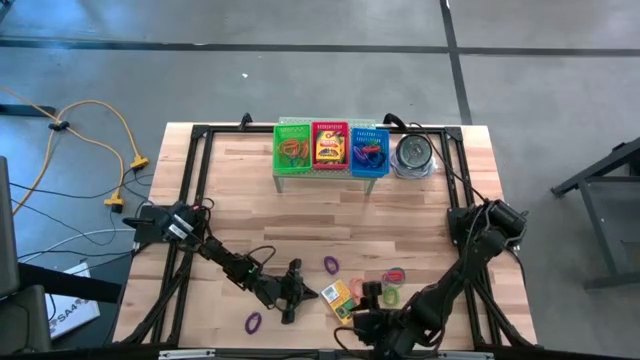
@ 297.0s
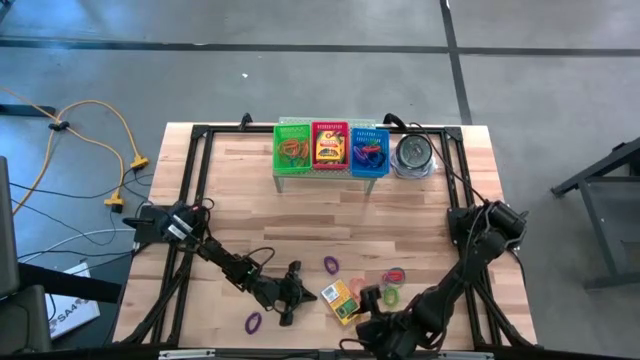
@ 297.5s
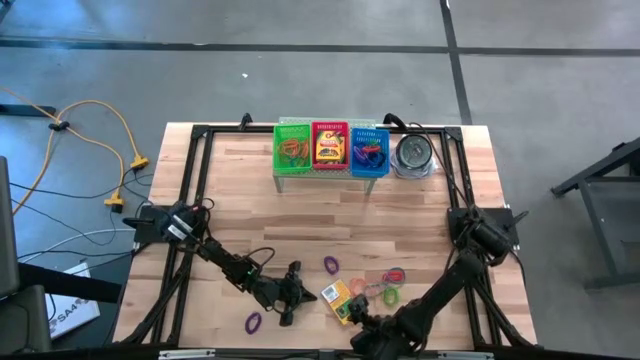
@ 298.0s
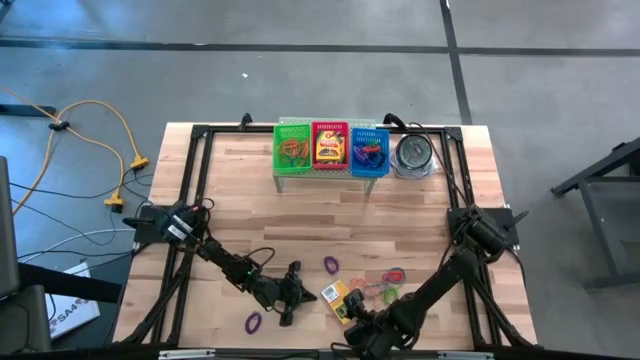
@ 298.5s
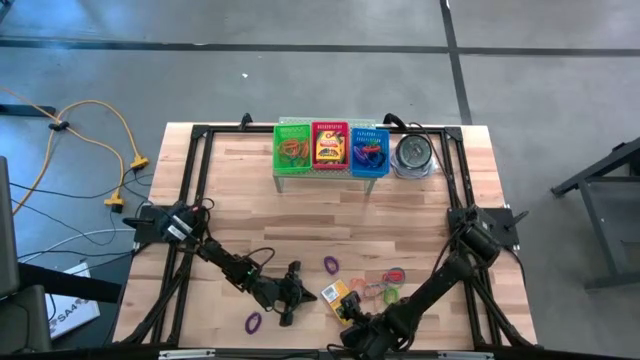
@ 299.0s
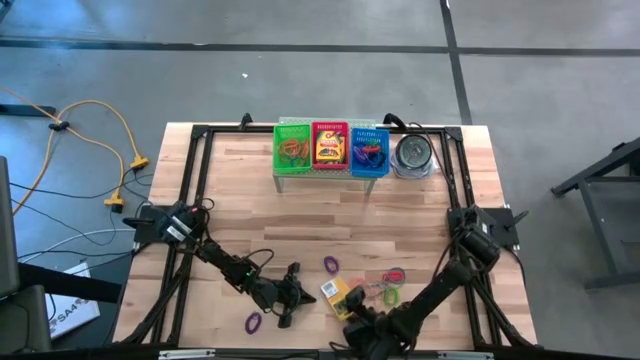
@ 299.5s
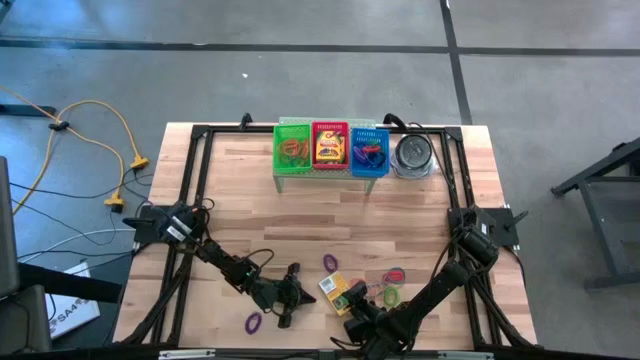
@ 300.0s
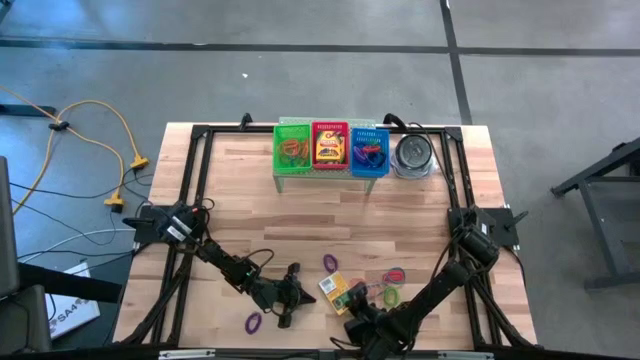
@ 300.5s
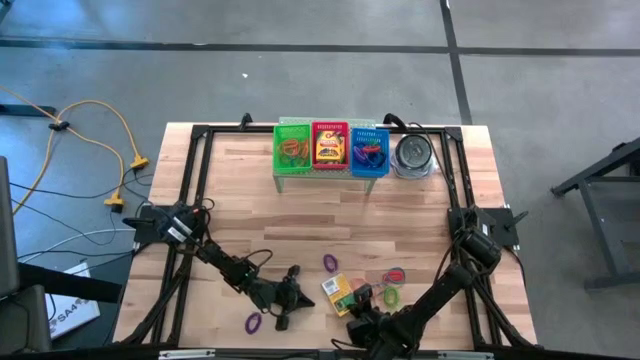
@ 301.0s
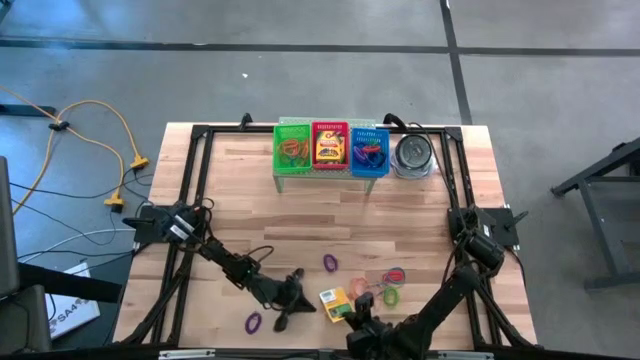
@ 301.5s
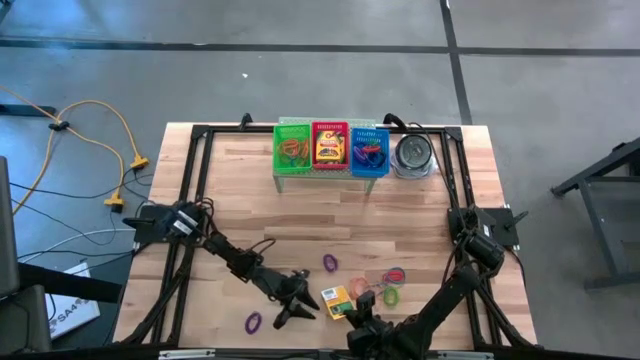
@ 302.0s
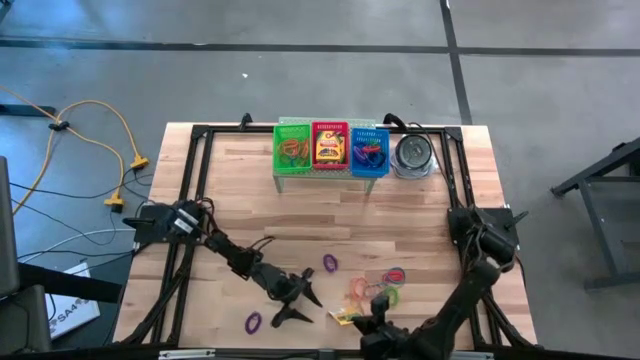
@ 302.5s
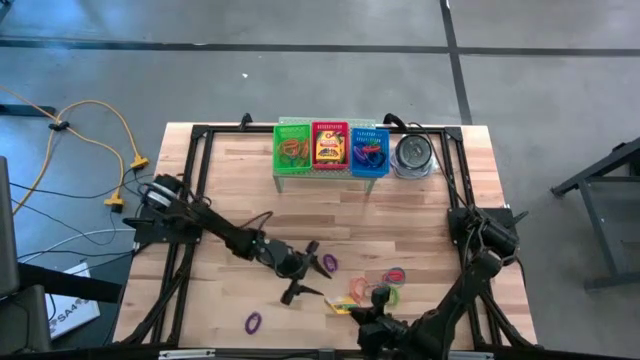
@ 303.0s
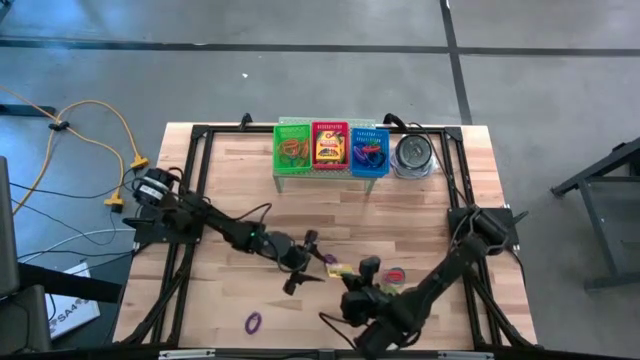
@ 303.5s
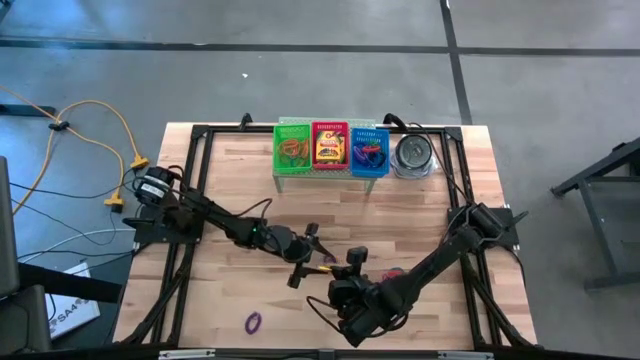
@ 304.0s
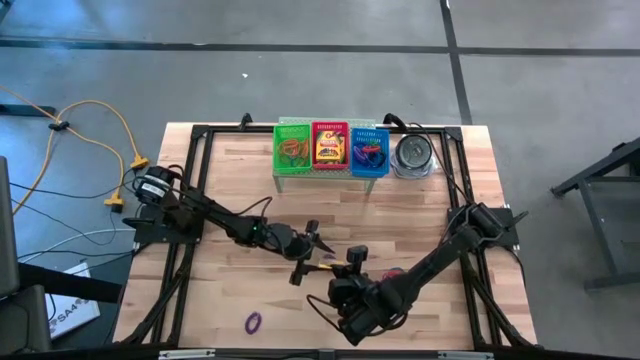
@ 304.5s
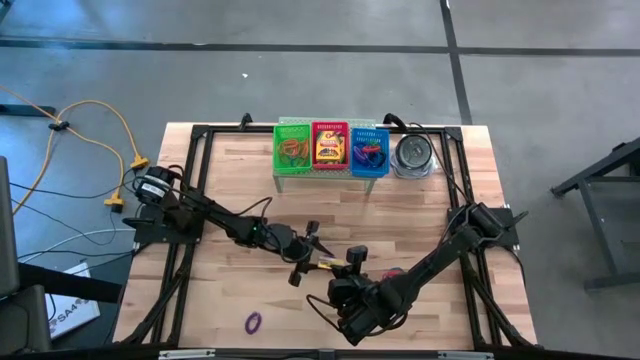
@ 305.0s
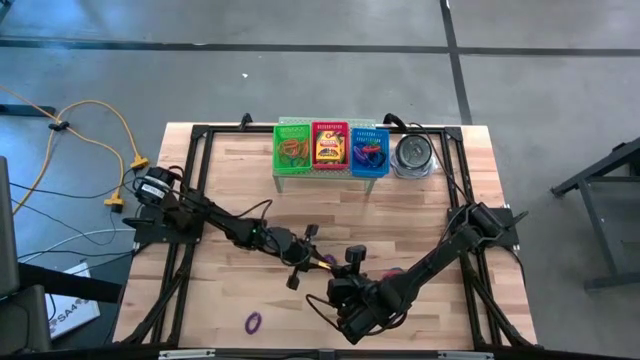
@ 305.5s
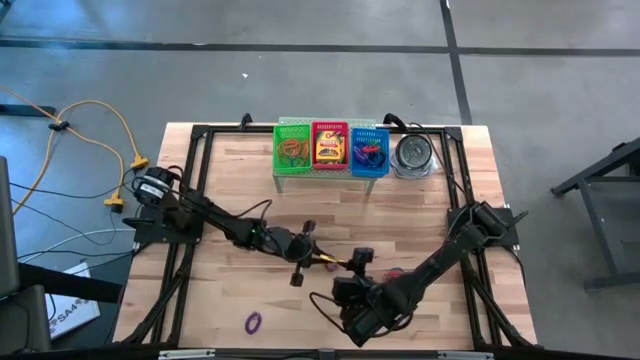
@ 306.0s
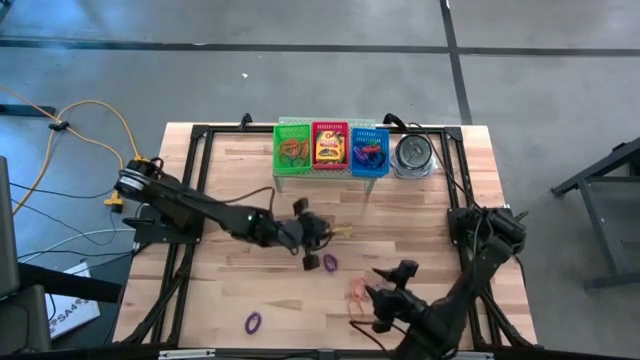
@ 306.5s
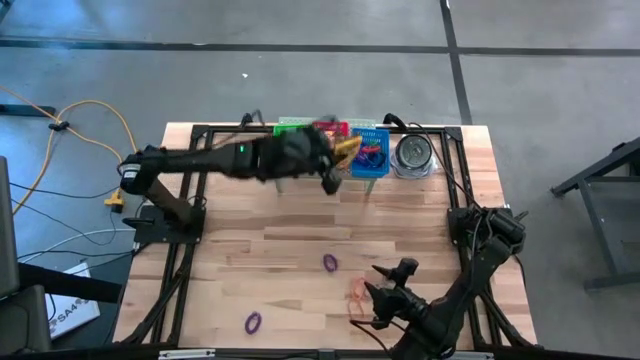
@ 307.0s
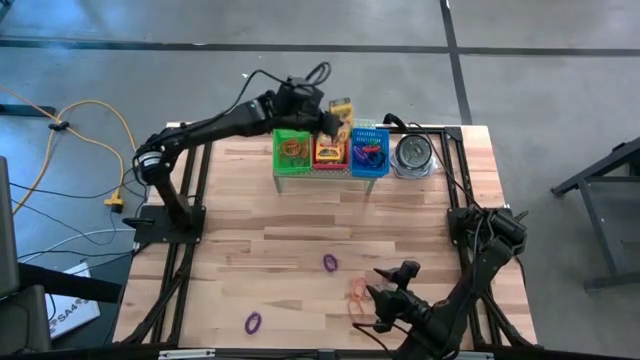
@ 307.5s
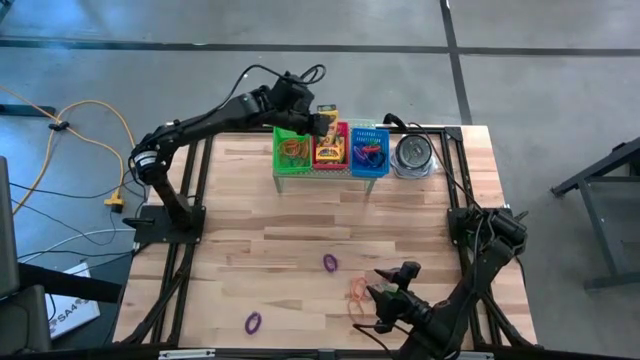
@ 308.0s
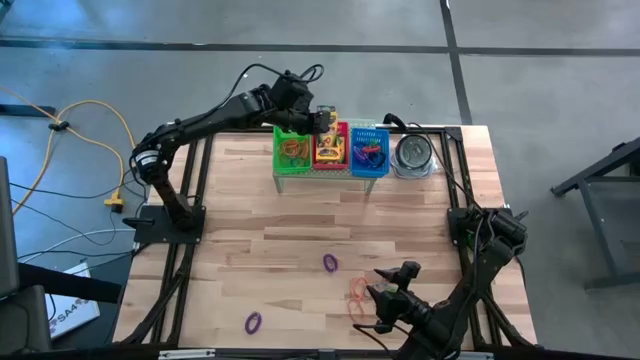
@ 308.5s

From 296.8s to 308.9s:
Task: Pick & Place Office Desk Supplies
Put the yellow crayon box into the red bin on the shelf
